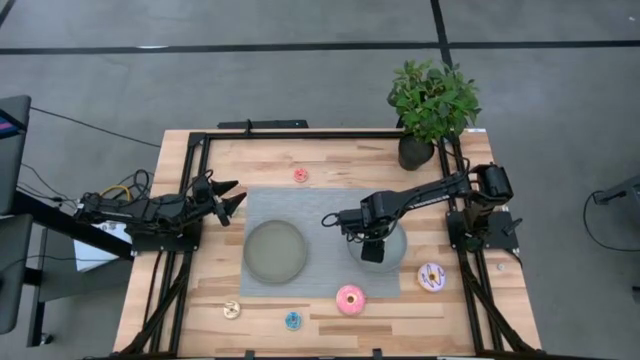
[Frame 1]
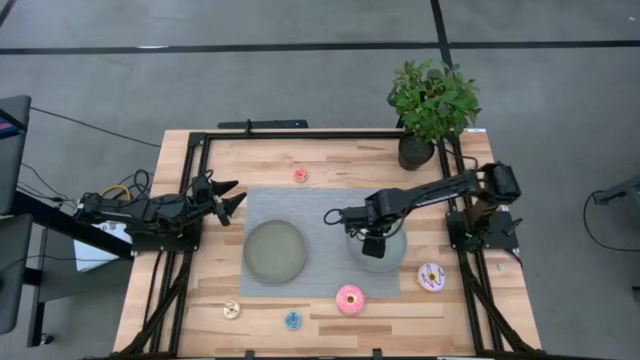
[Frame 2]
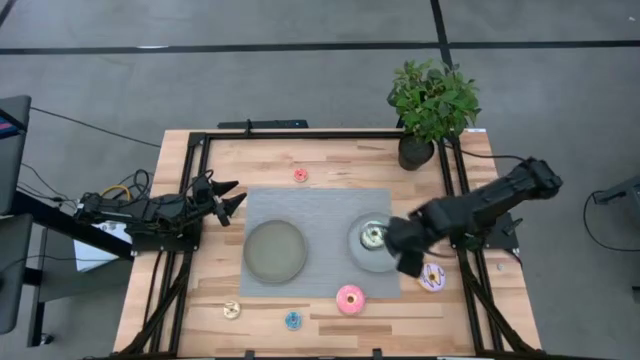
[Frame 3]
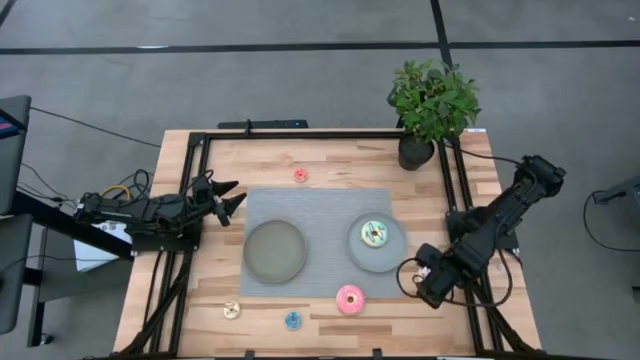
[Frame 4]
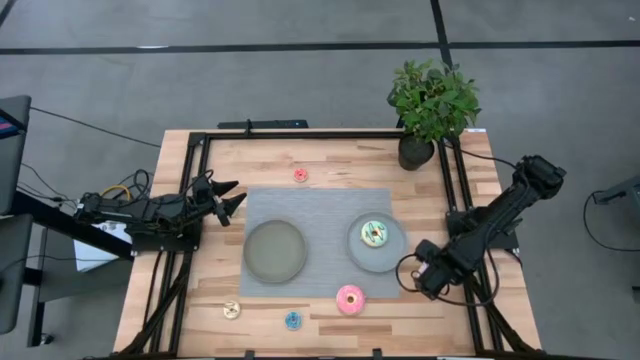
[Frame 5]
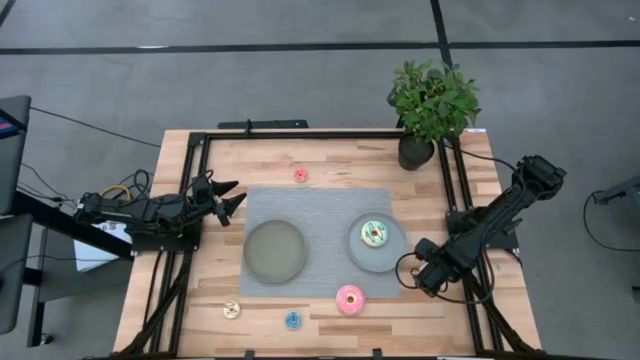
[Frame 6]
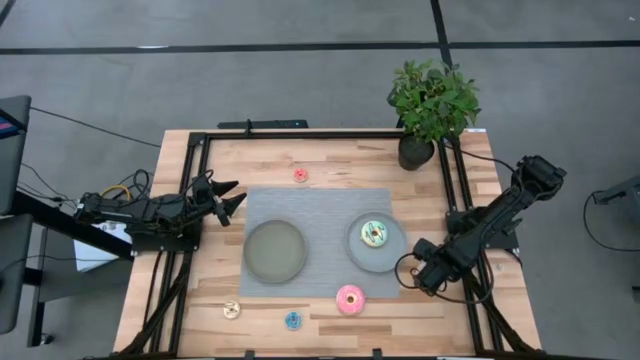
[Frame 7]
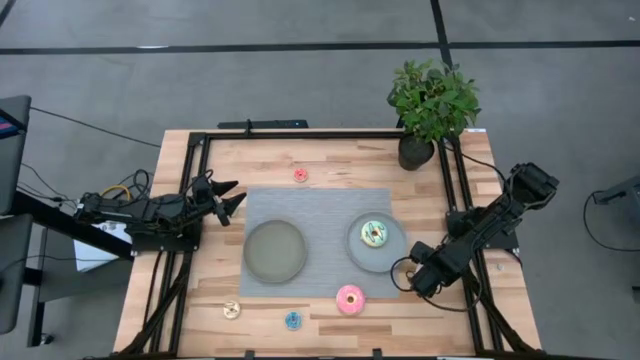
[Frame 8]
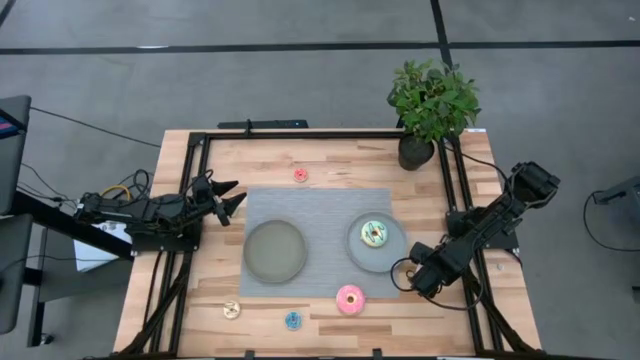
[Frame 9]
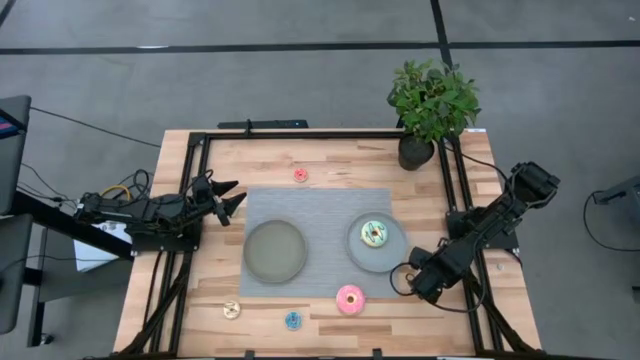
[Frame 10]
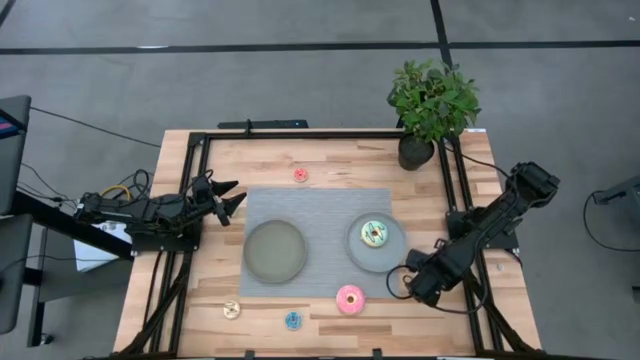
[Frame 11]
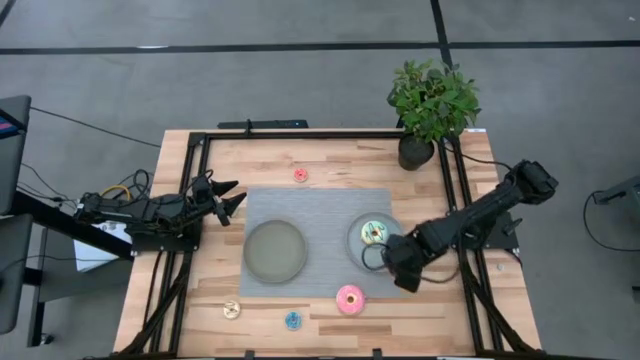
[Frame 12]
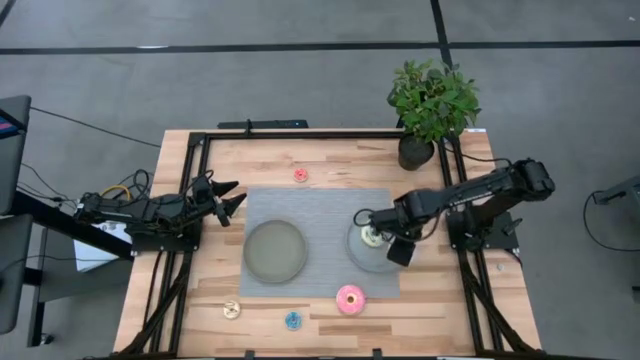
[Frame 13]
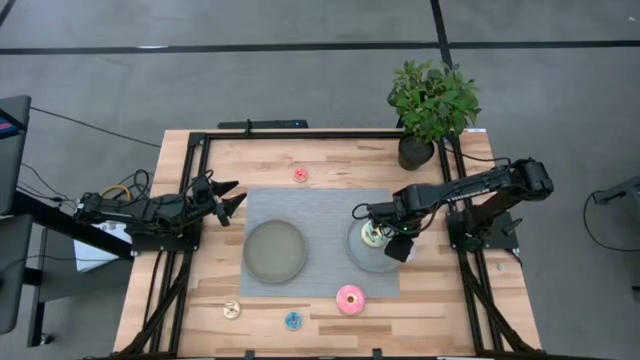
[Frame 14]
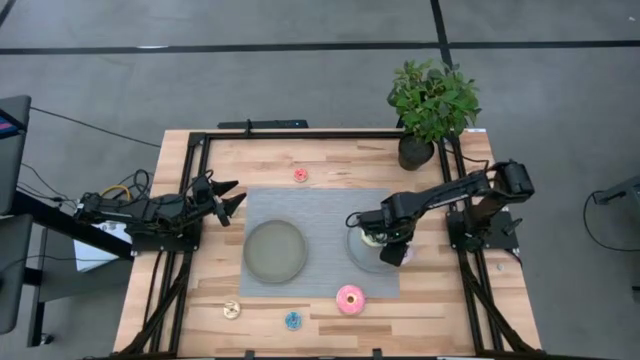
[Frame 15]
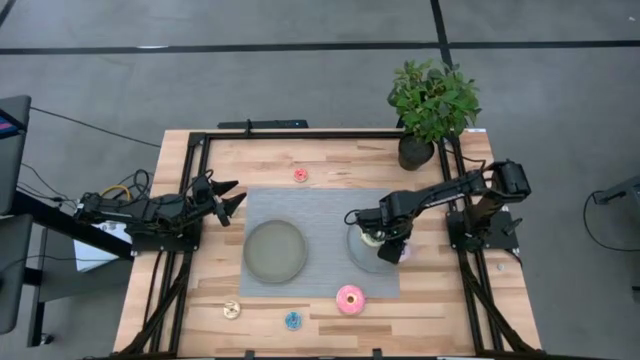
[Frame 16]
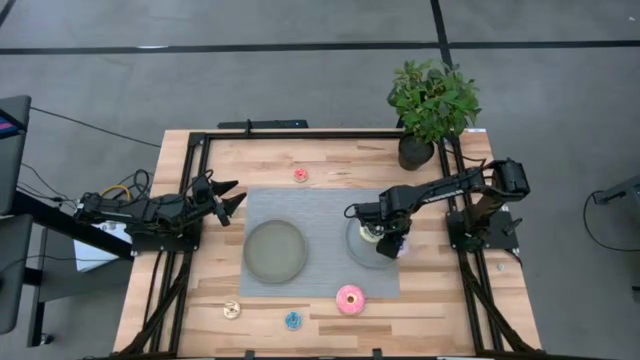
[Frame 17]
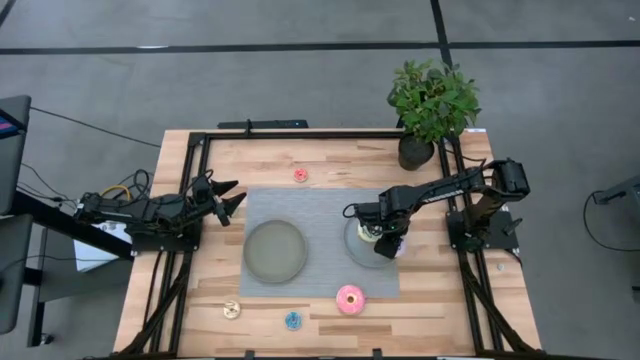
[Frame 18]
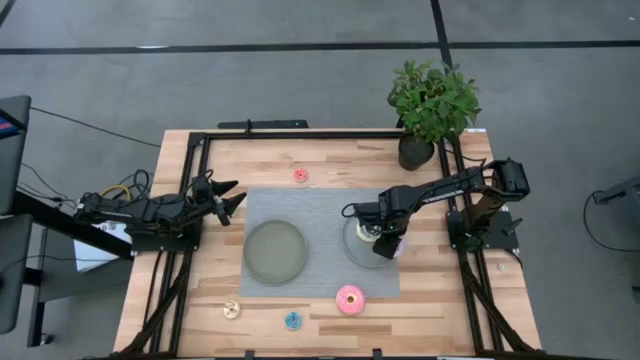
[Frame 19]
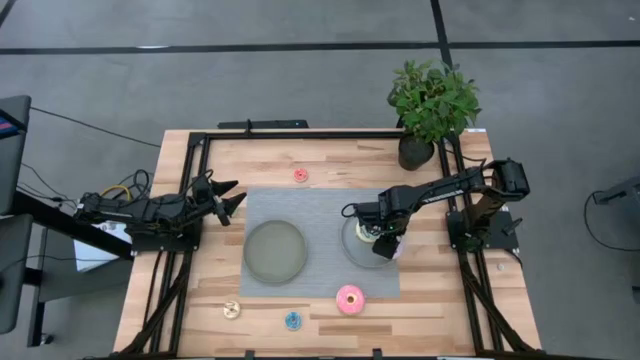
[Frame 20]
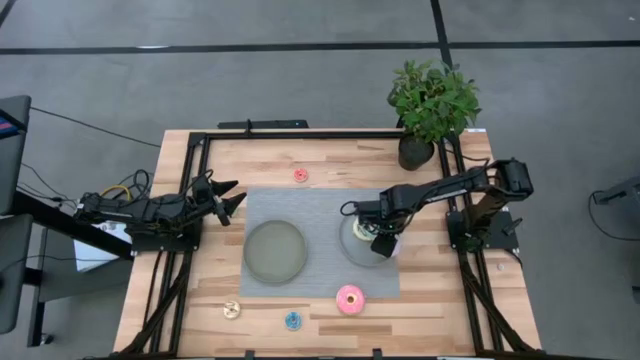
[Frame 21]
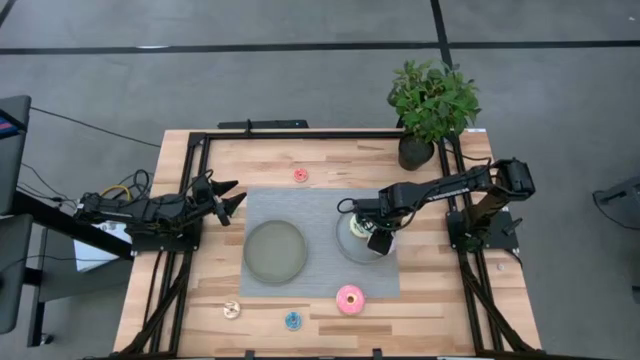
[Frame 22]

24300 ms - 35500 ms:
Task: Pick & Place donuts
Put the large purple donut on the gray plate

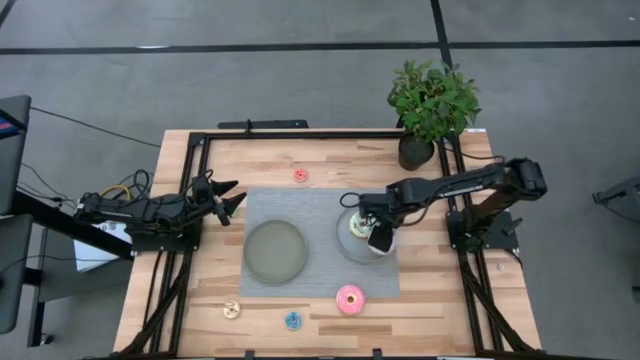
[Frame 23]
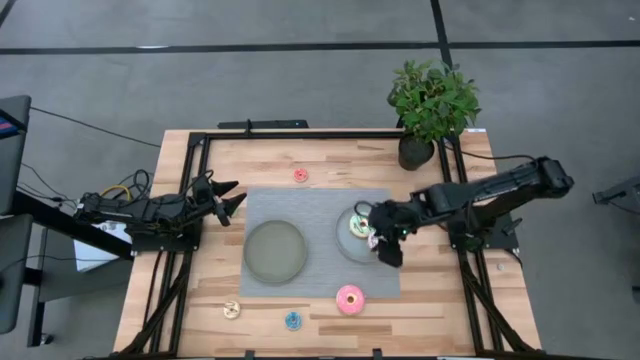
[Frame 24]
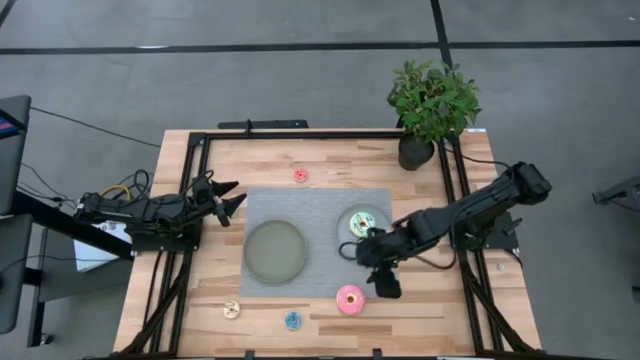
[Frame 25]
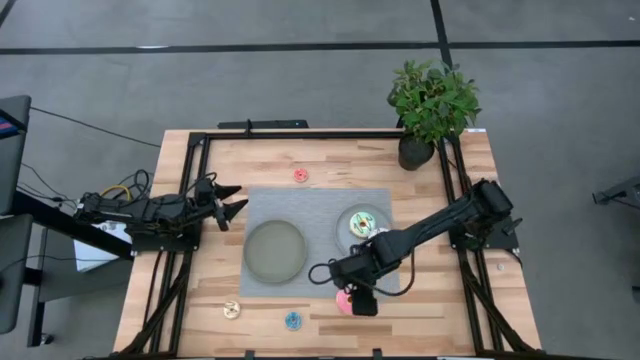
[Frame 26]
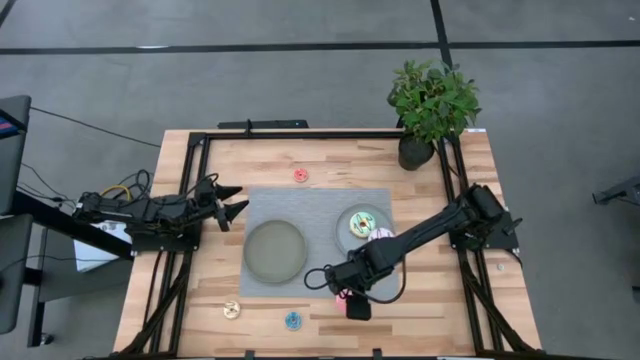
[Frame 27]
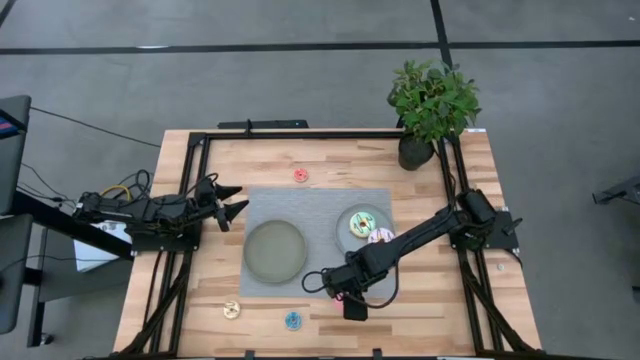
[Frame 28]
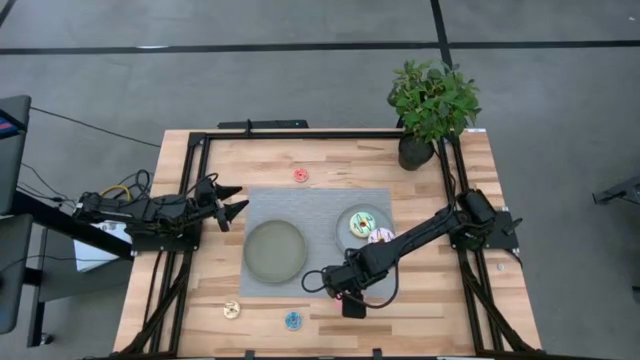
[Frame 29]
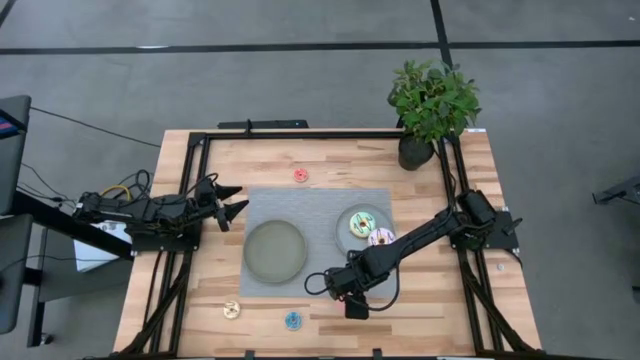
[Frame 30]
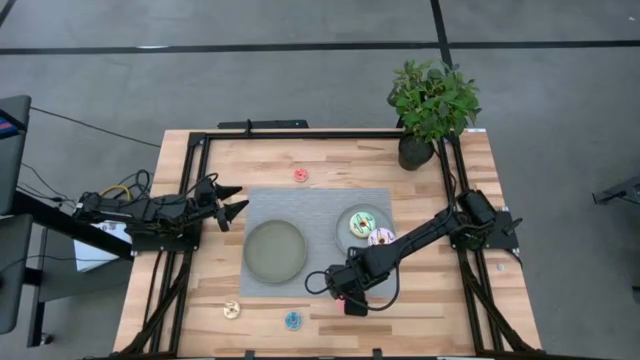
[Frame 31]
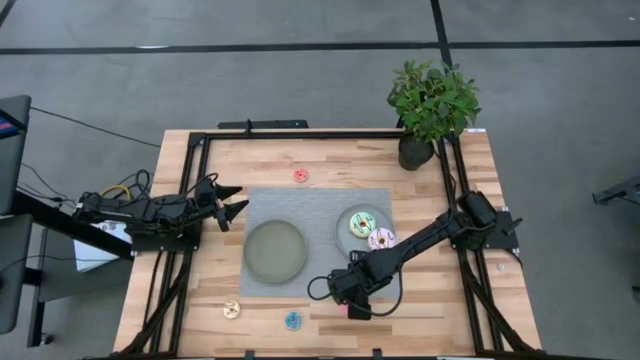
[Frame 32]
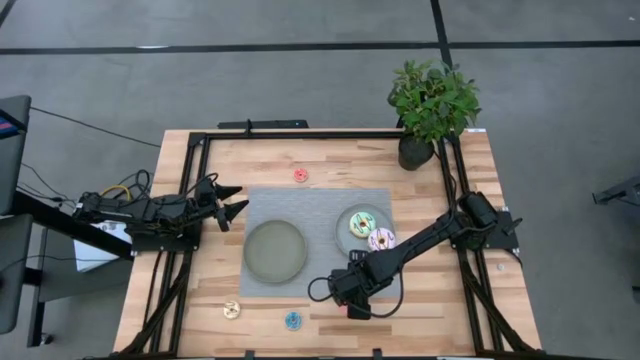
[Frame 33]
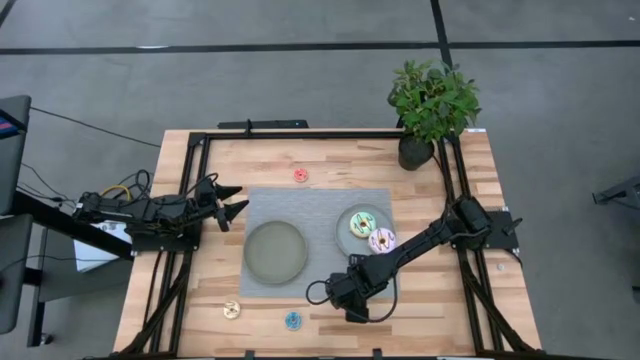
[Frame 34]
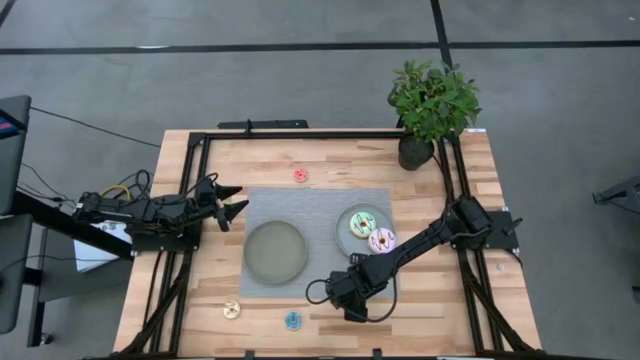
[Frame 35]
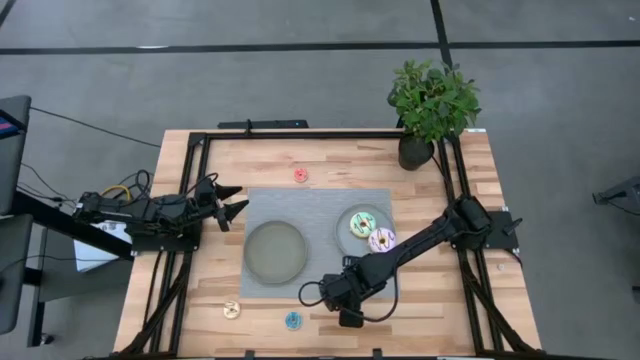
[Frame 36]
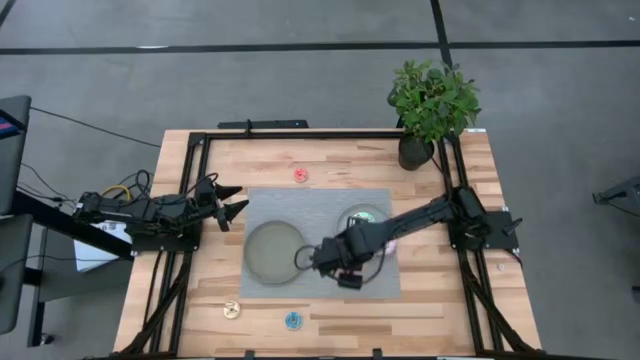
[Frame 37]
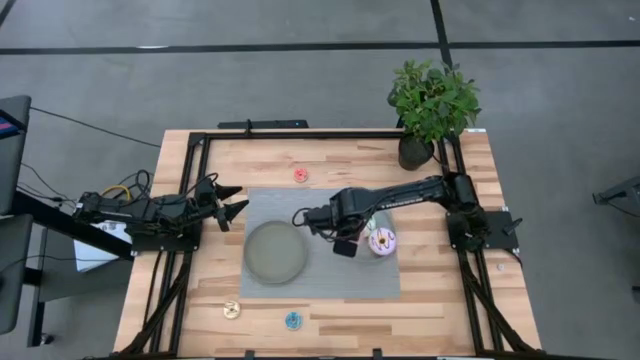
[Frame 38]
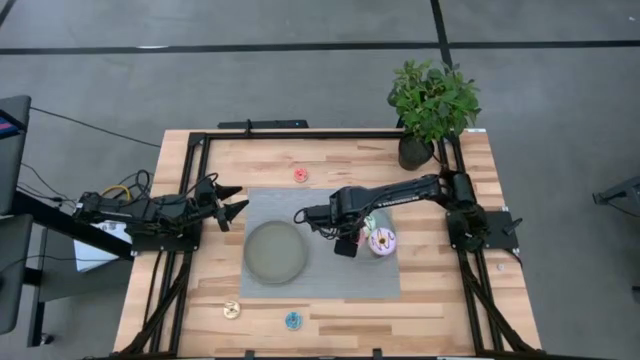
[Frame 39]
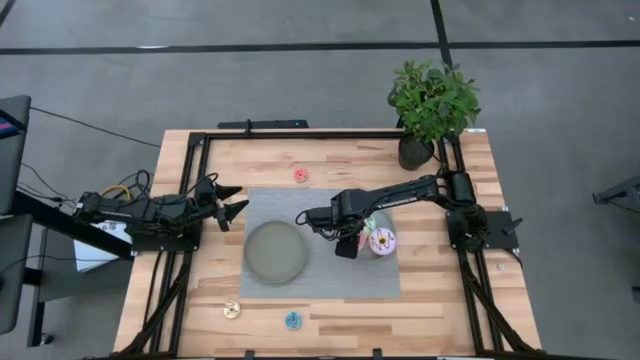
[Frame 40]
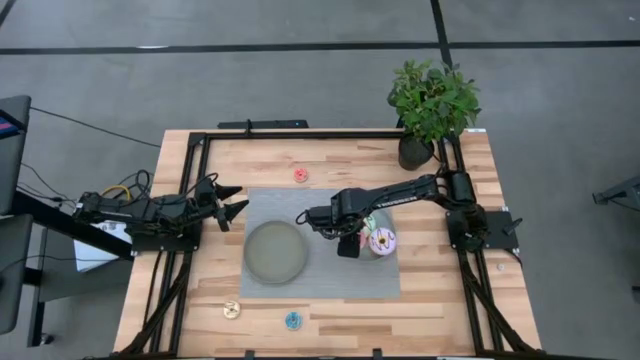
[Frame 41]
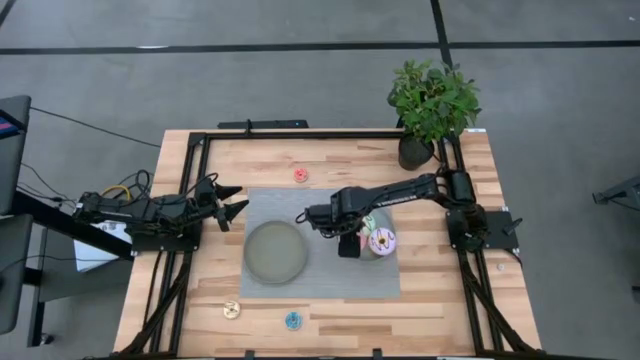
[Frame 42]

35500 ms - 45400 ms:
Put the large pink donut on the gray plate
